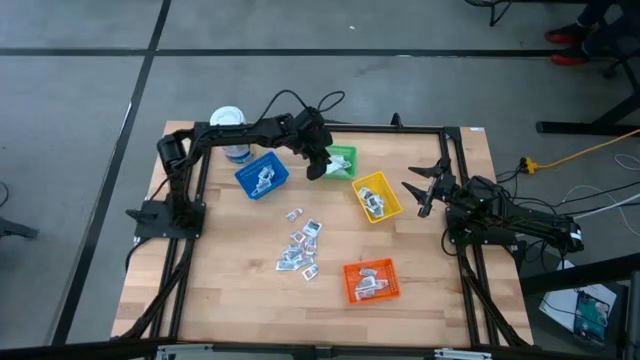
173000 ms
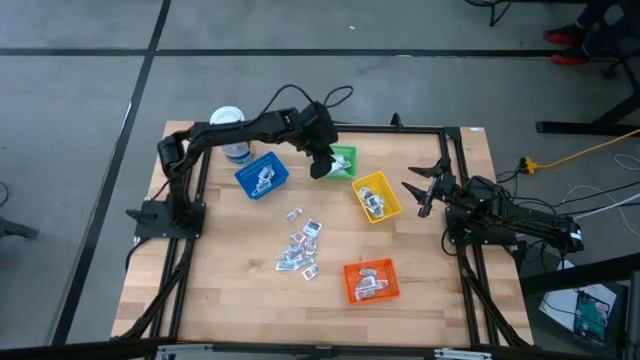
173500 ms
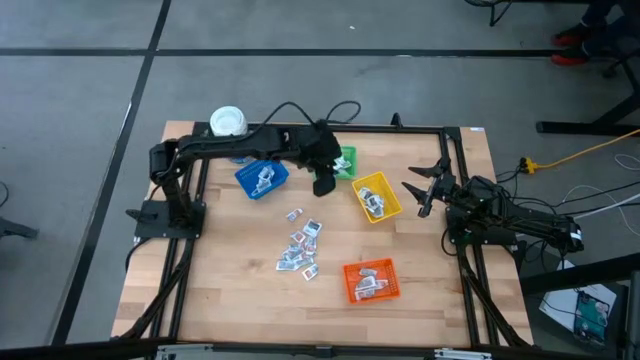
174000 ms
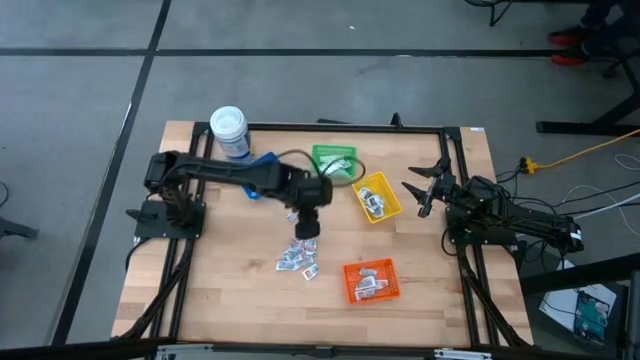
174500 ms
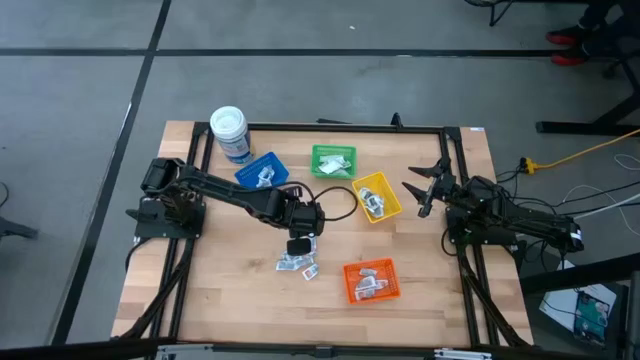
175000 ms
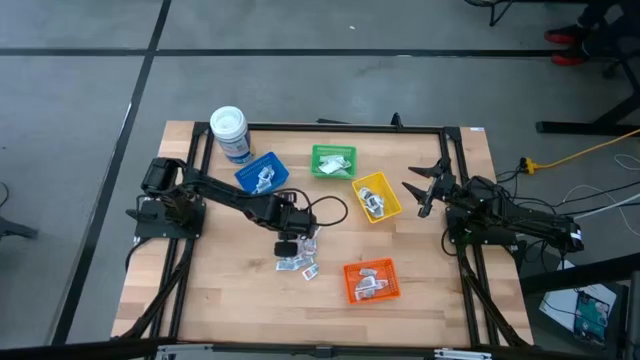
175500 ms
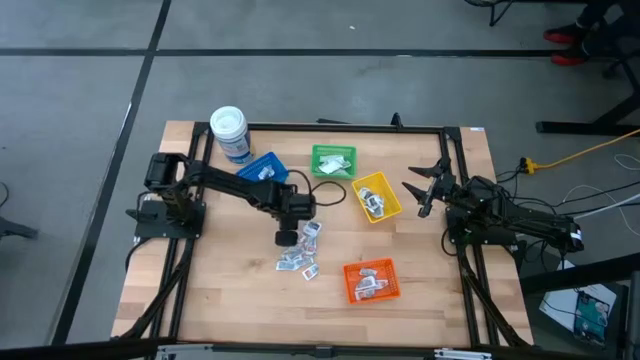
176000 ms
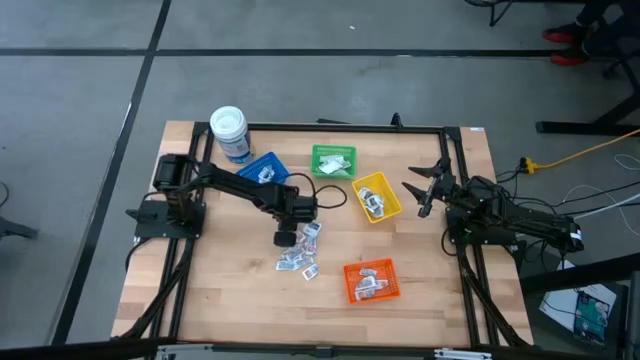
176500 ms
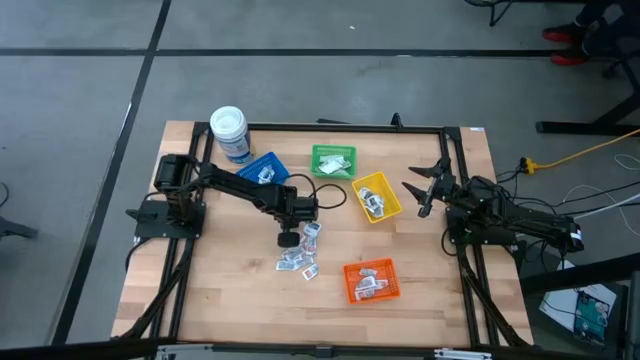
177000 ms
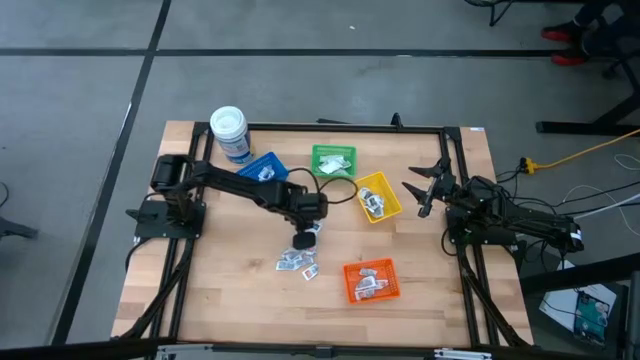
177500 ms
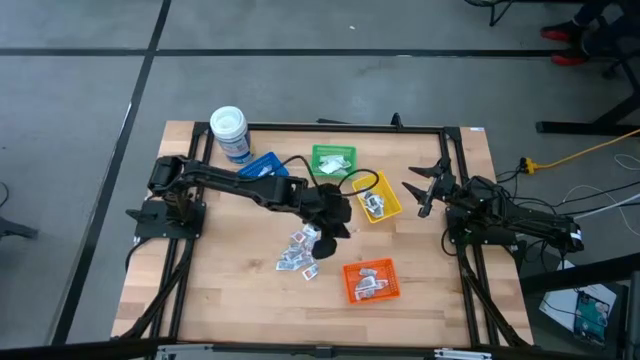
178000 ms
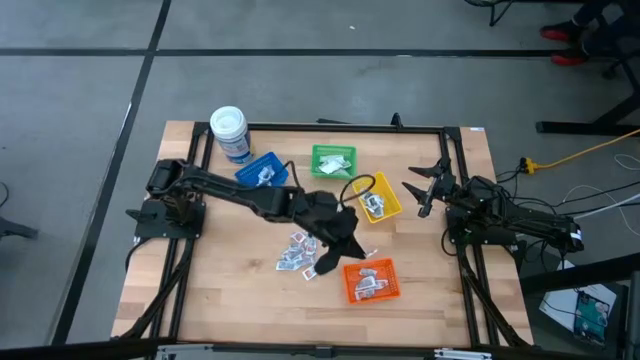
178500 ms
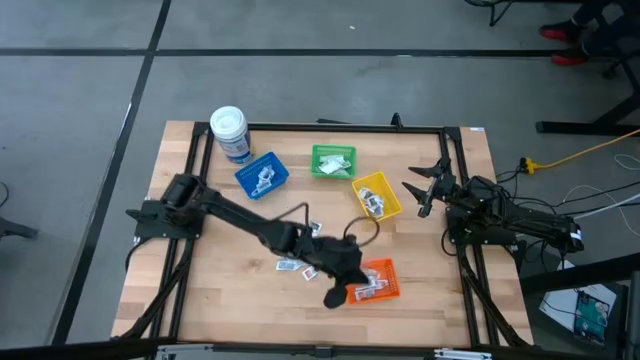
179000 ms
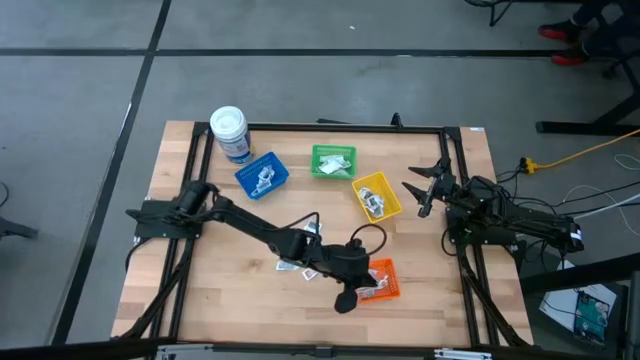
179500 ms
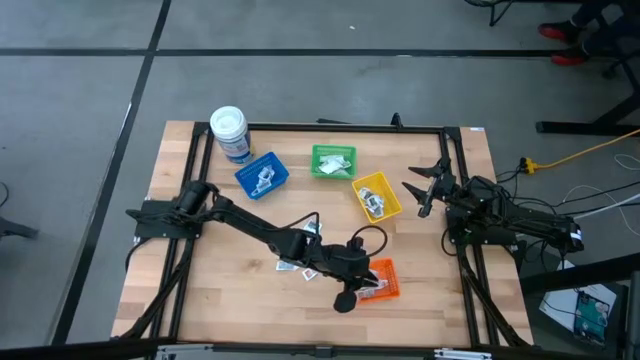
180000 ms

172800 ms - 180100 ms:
Task: Pick & Place First Aid Supplies
Put the white ointment pack into the orange bin

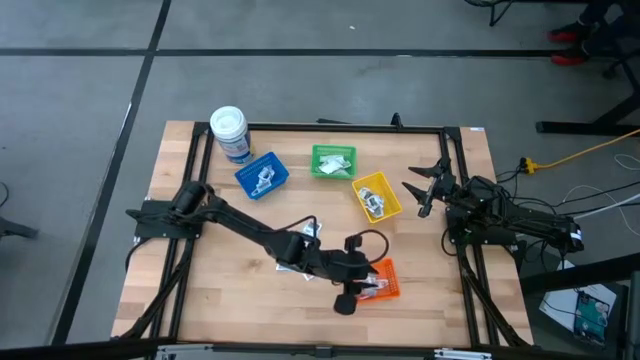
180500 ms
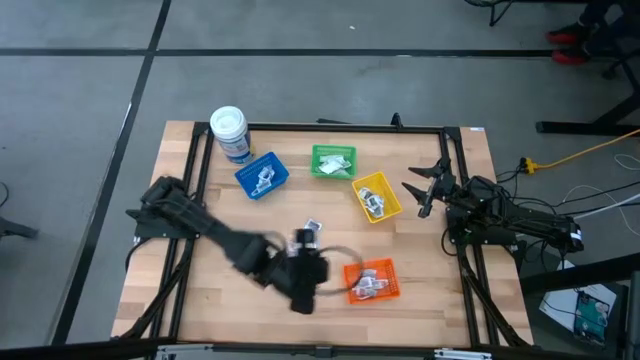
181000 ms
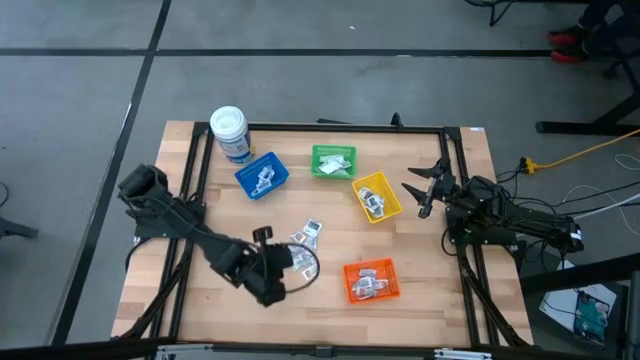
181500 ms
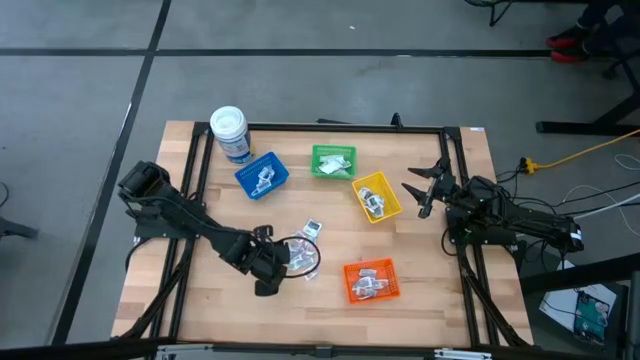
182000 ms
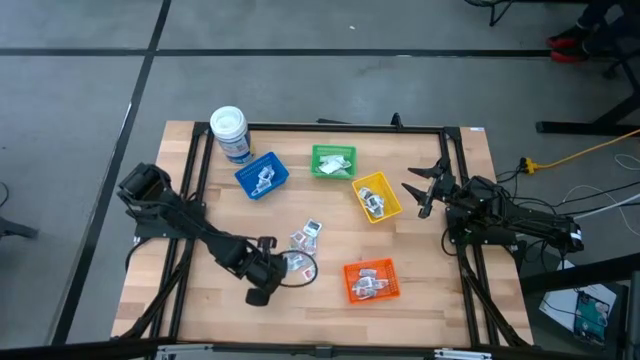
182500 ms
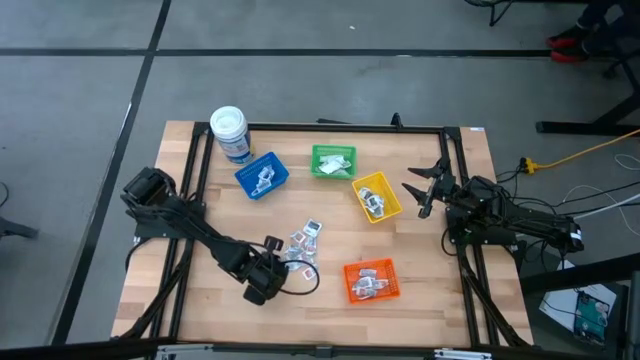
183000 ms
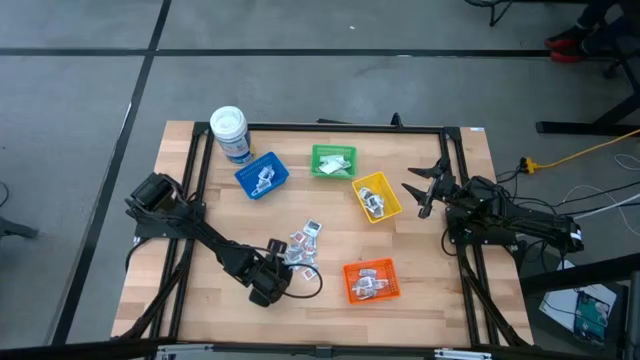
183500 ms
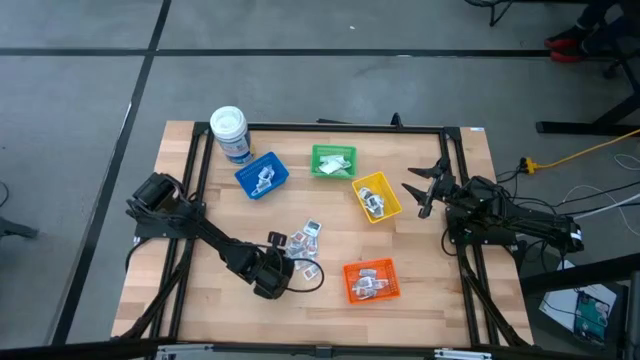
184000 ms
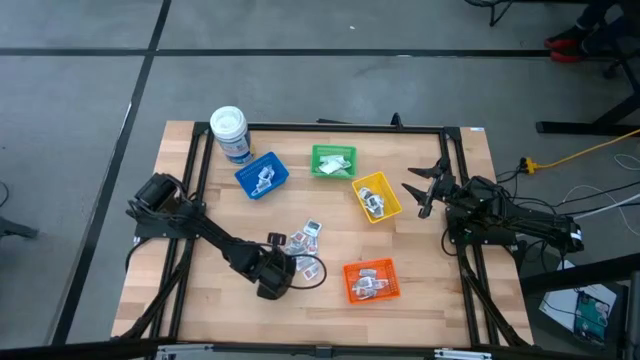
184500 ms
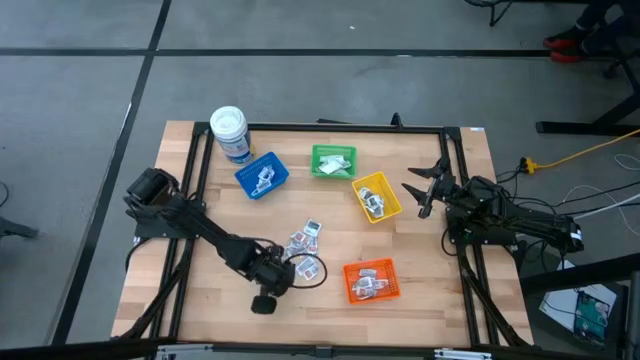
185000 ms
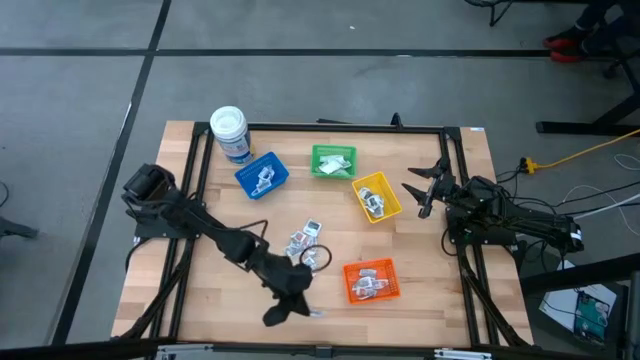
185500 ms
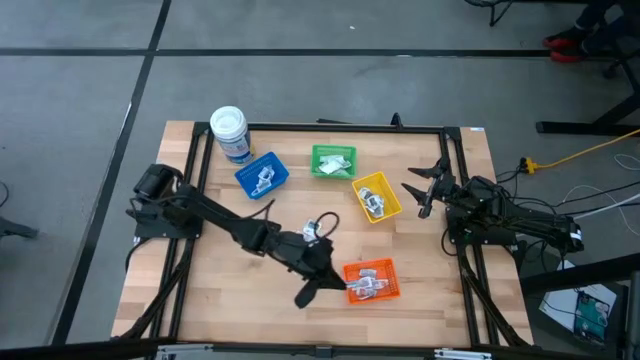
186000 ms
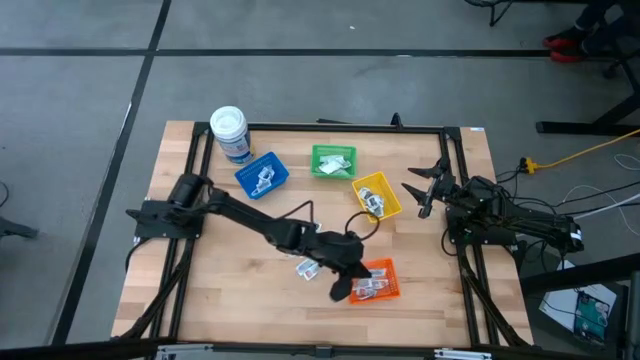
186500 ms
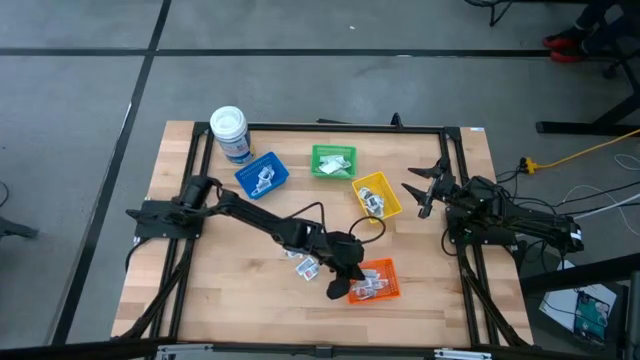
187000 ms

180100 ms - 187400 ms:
Put the white ointment pack into the orange bin

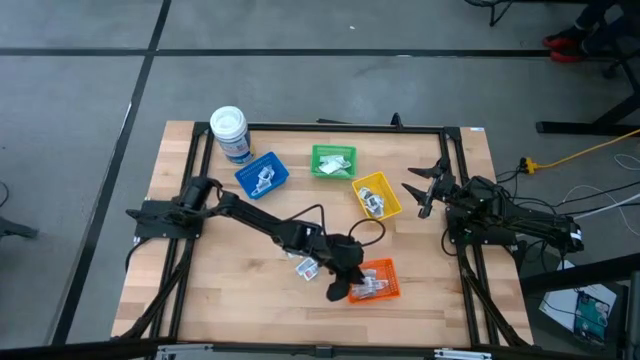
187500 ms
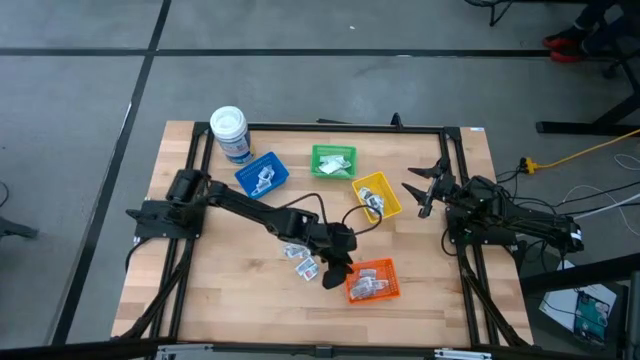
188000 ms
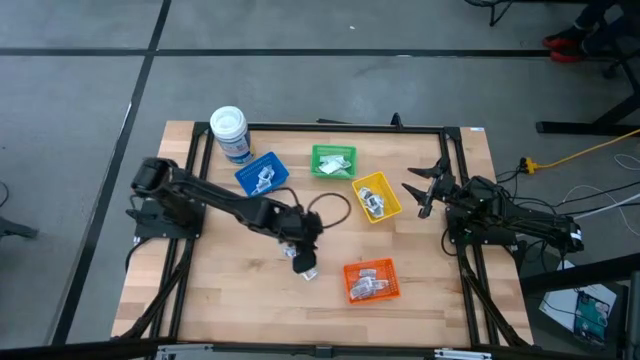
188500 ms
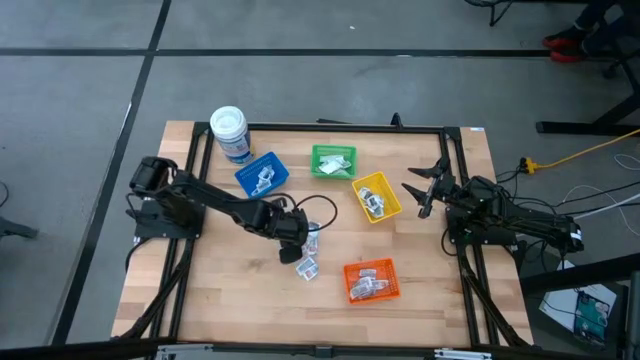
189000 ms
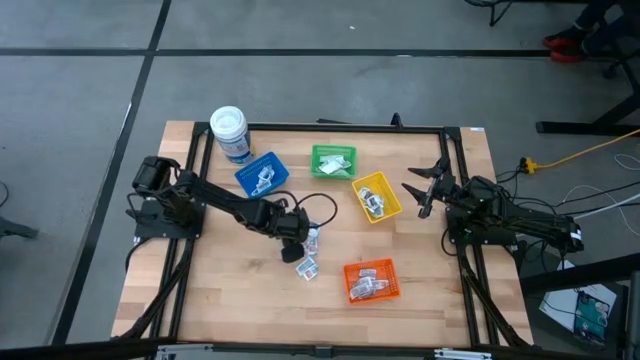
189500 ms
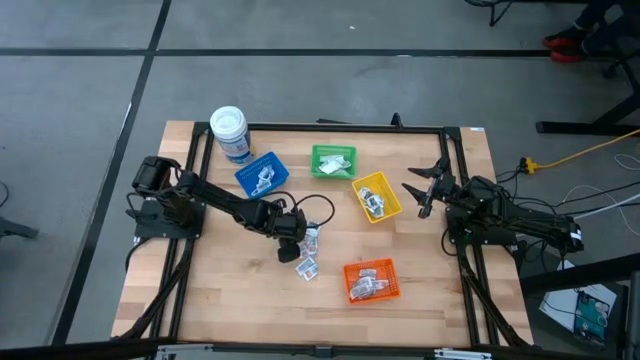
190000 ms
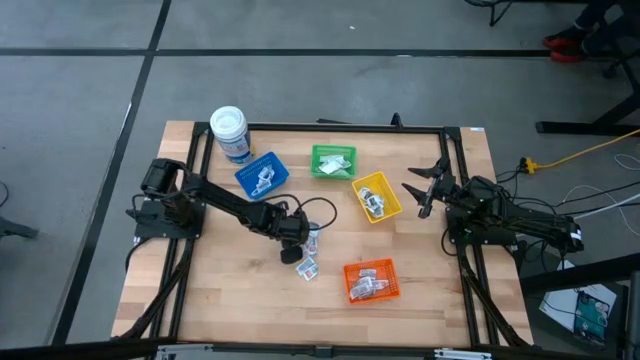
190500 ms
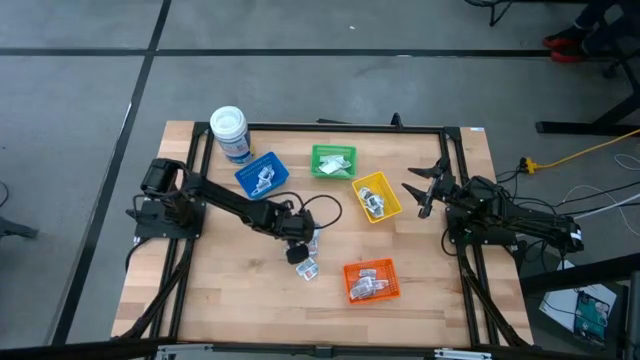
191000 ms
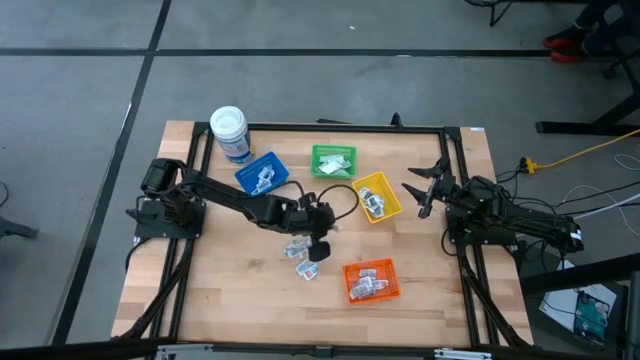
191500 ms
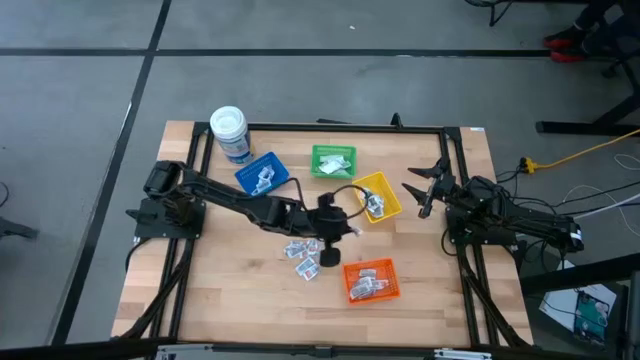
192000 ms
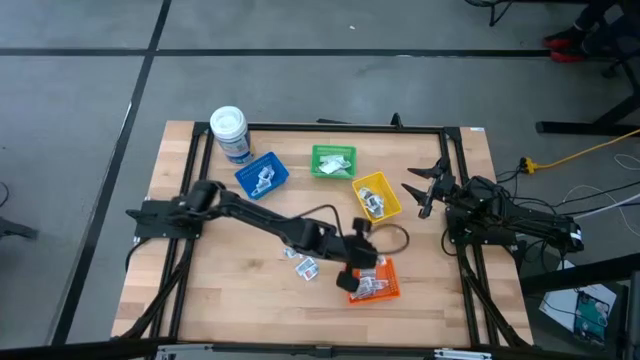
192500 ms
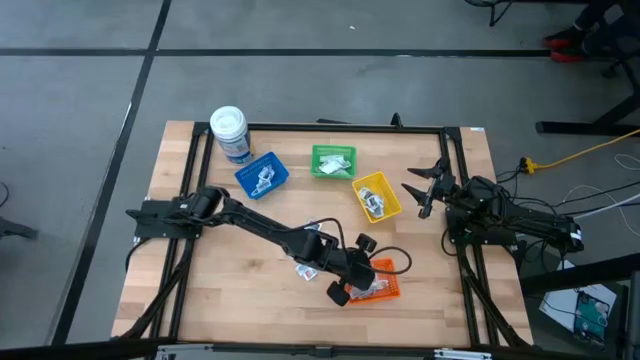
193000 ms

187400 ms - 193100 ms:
Put the white ointment pack into the orange bin
